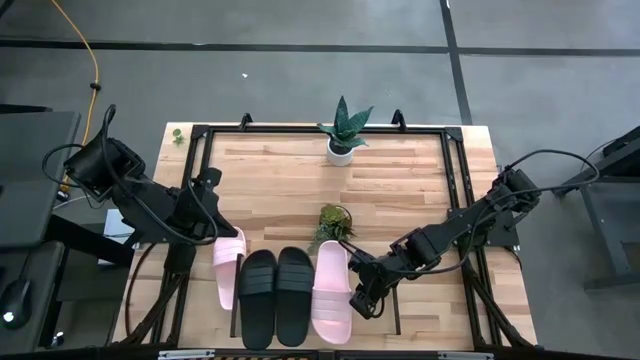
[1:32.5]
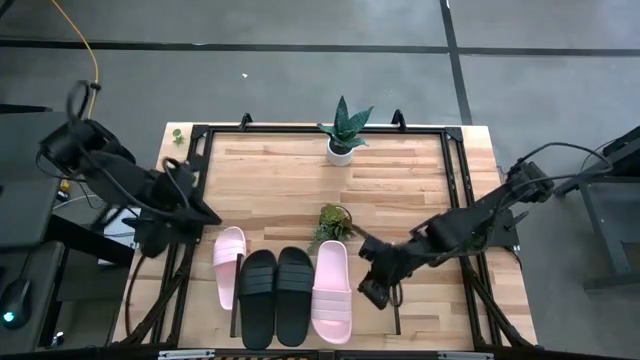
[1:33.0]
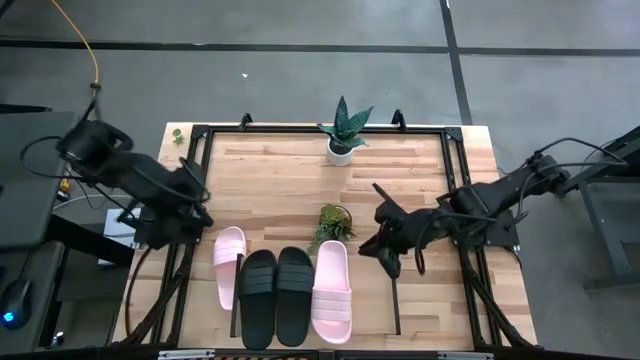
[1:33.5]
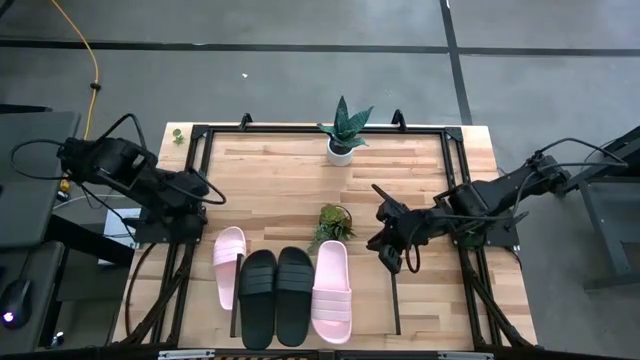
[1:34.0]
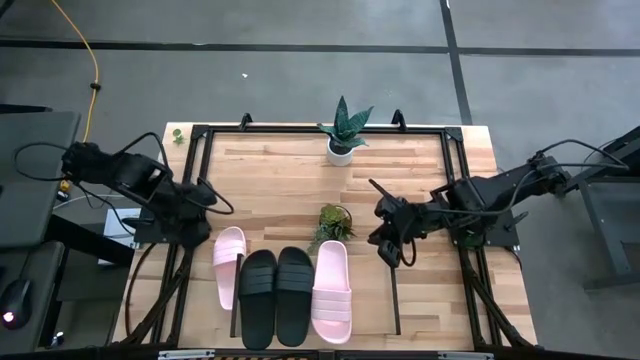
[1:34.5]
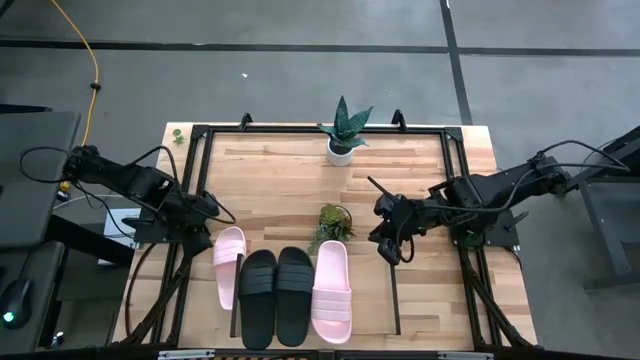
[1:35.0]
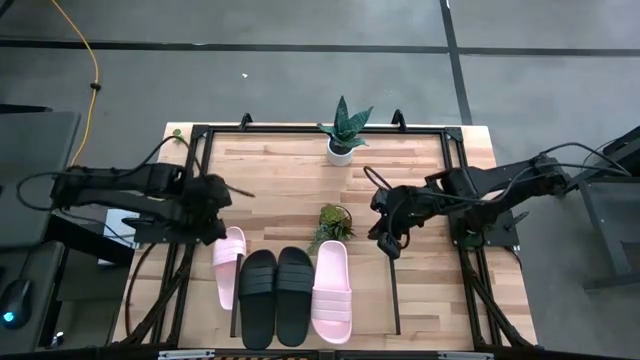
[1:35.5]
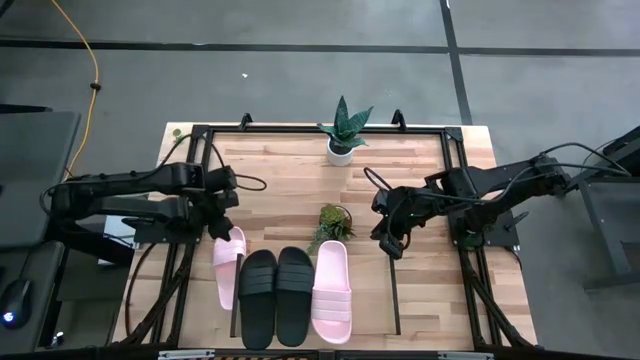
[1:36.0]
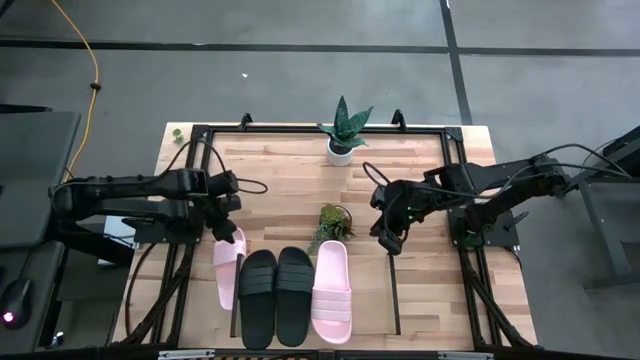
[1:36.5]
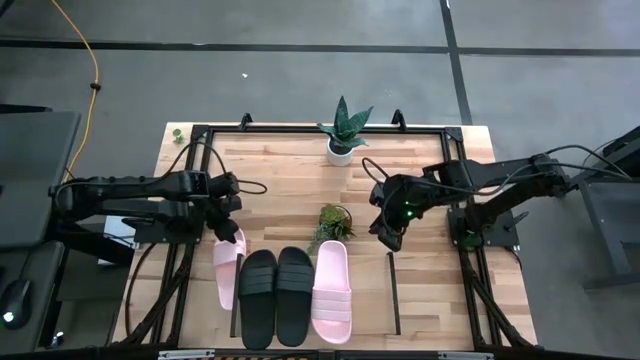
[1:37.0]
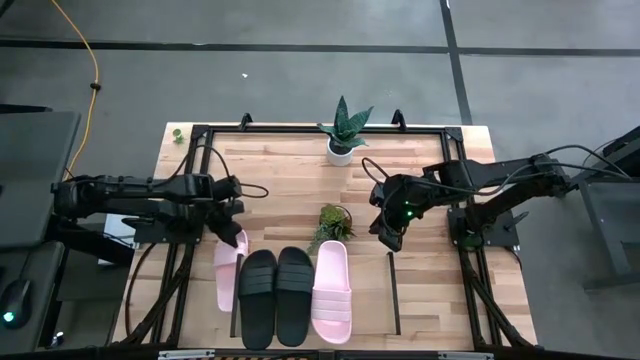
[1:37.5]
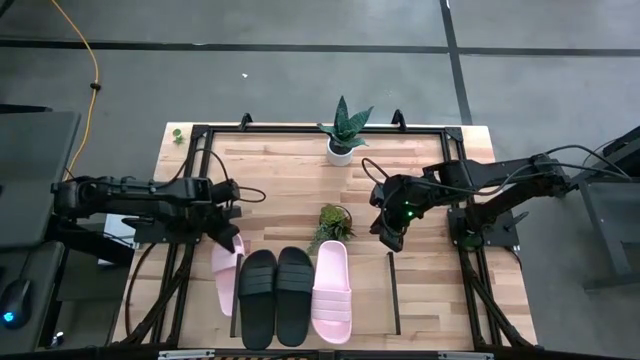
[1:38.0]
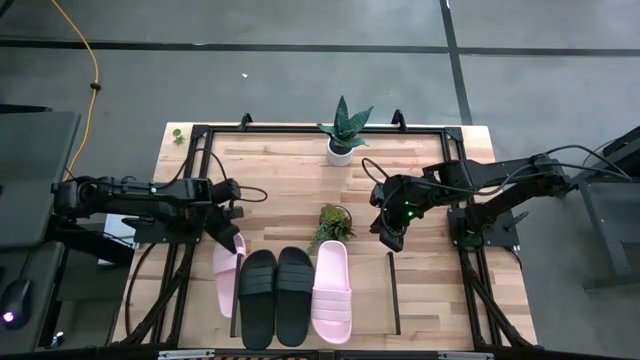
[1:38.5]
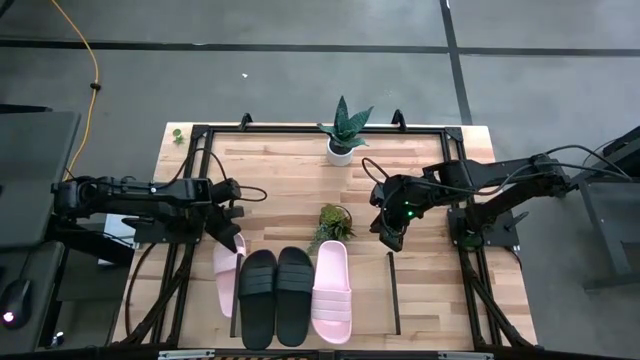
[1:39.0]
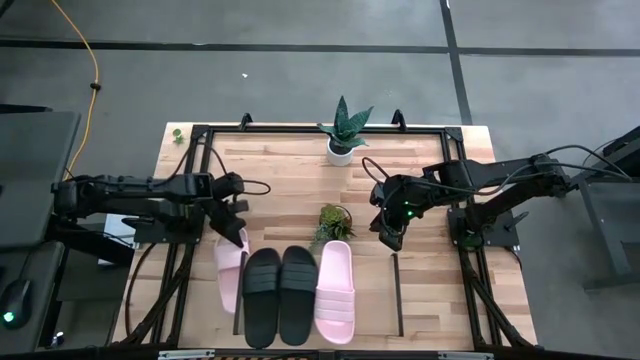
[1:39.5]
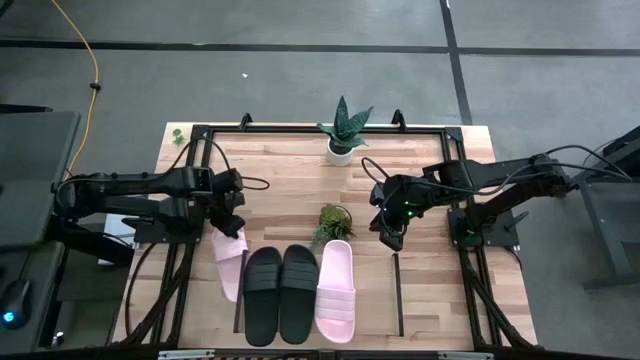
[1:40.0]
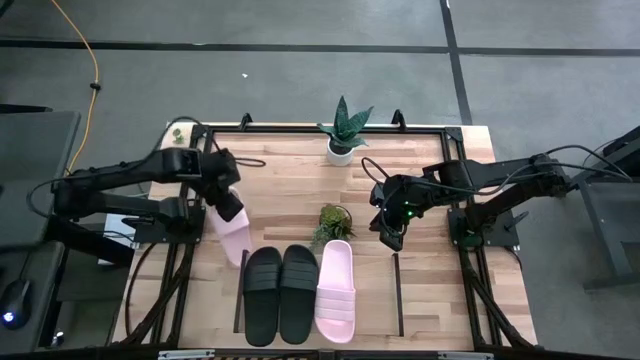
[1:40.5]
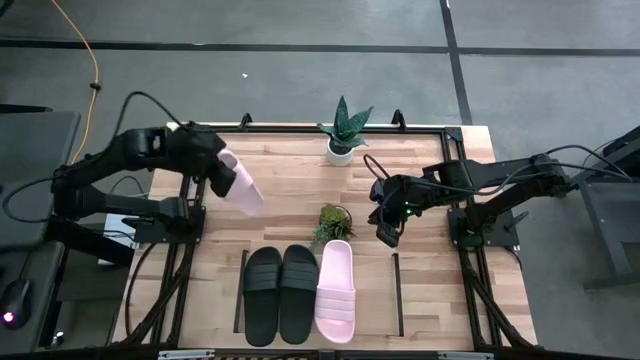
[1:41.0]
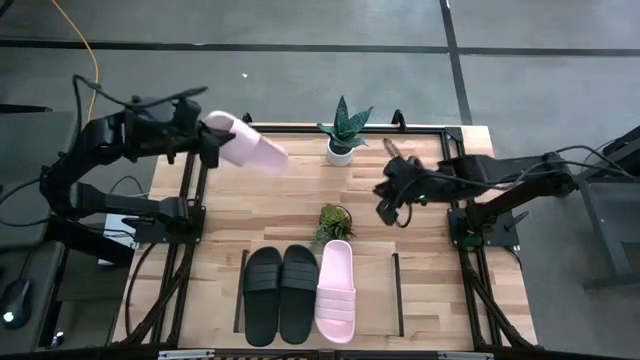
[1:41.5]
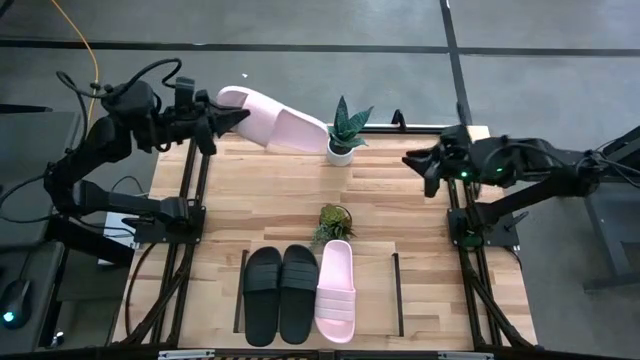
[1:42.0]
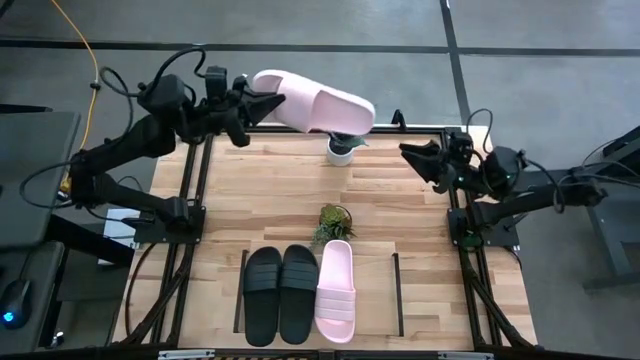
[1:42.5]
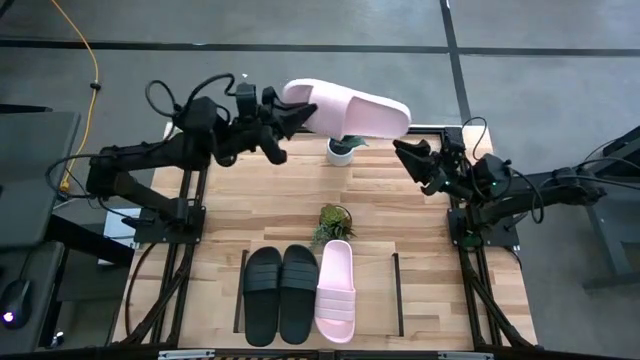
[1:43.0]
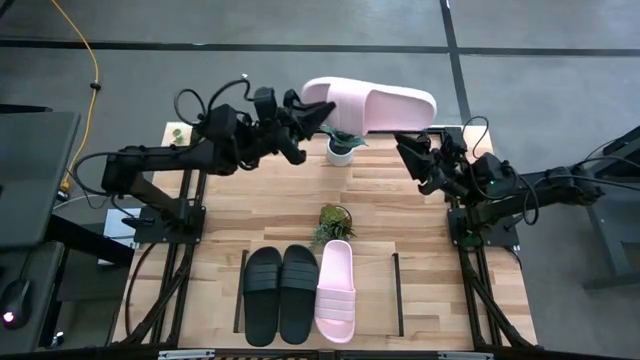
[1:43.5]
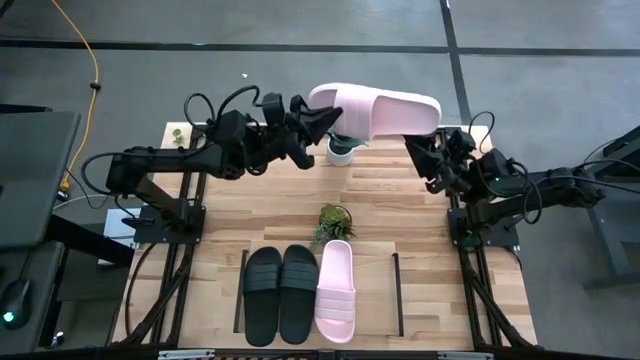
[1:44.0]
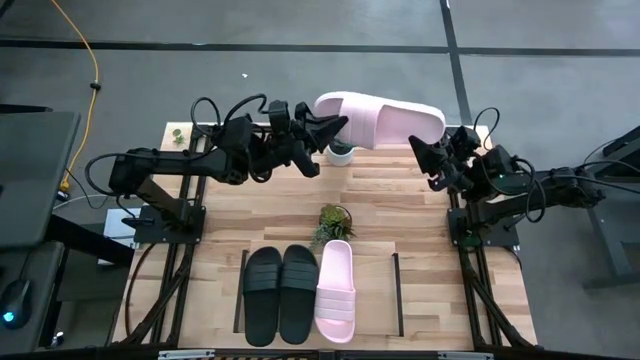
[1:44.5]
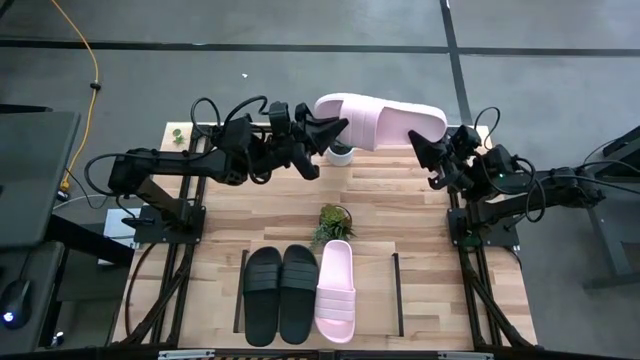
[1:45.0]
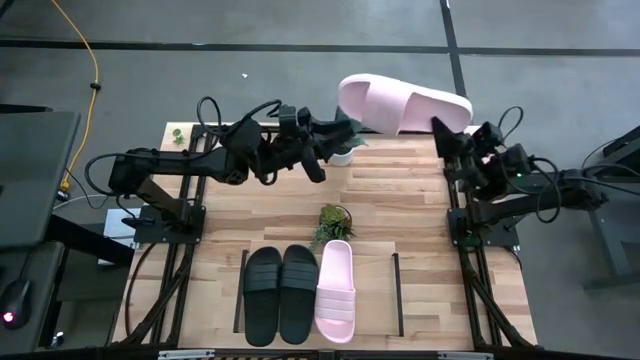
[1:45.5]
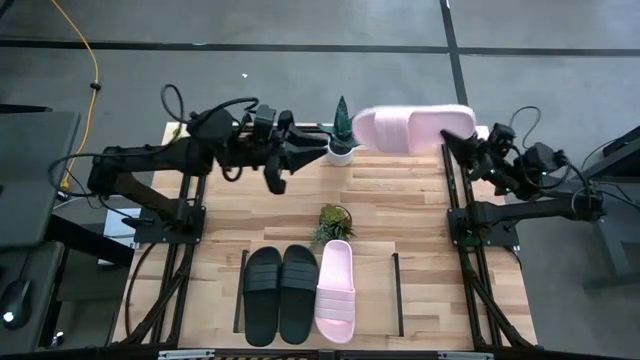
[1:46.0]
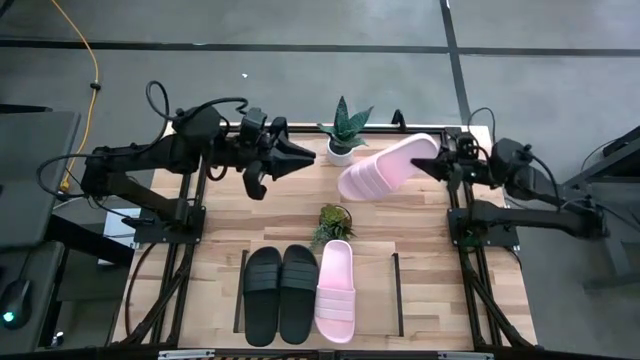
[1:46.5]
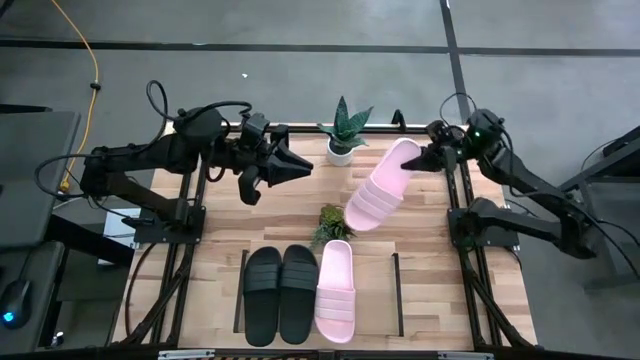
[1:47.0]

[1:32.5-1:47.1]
Task: Pick and place slides into the shelf
Put the pink slide on the shelf

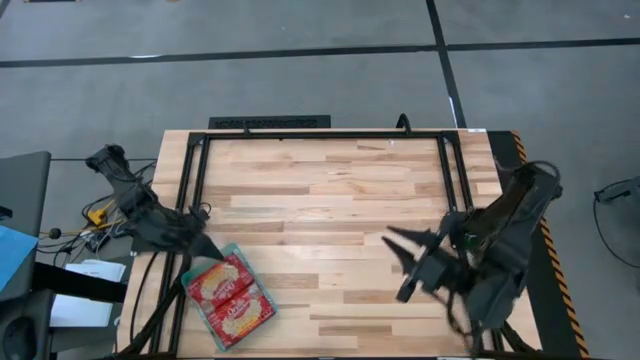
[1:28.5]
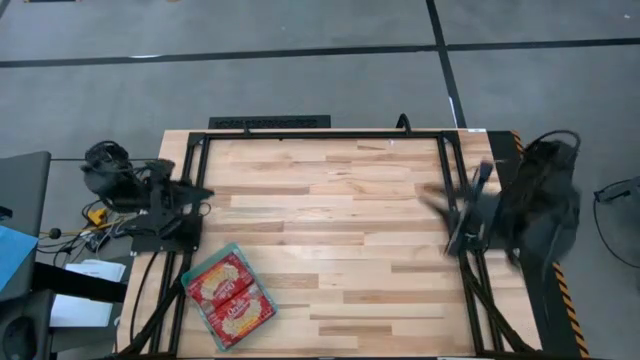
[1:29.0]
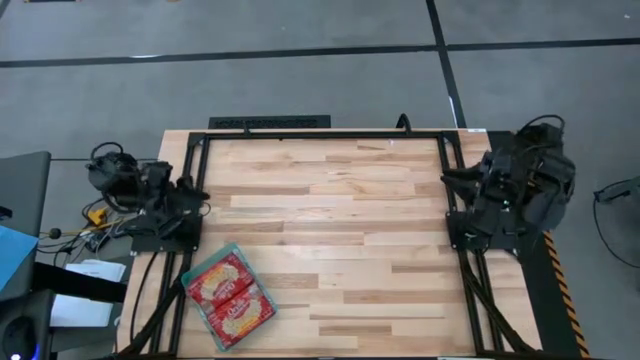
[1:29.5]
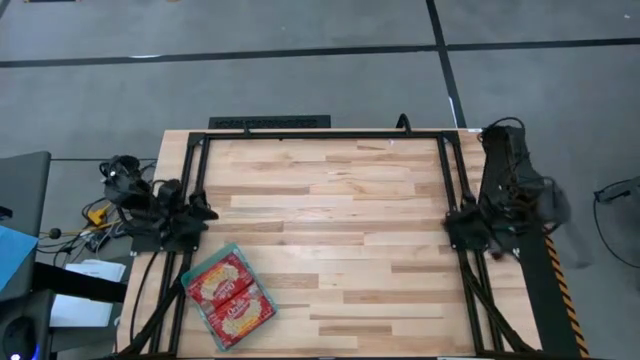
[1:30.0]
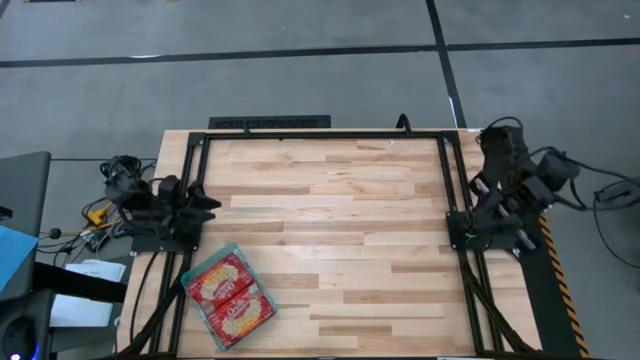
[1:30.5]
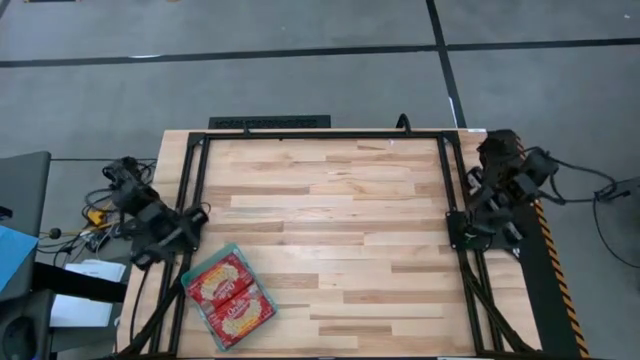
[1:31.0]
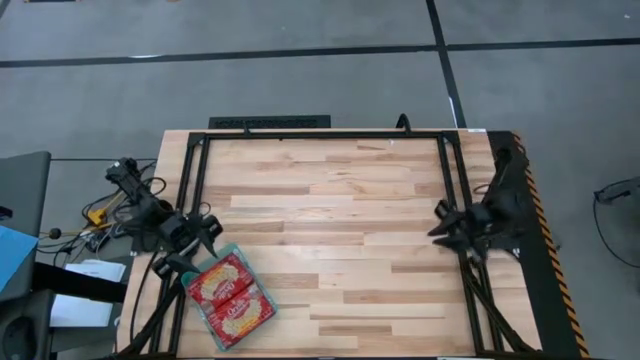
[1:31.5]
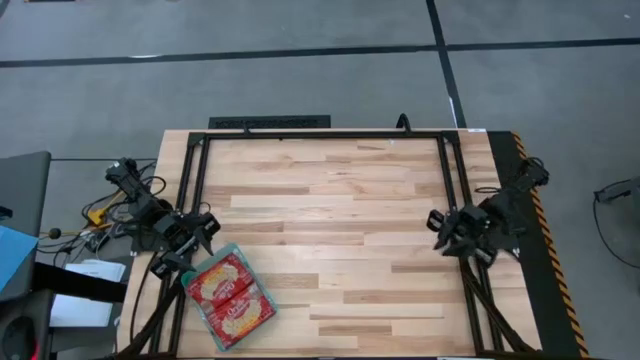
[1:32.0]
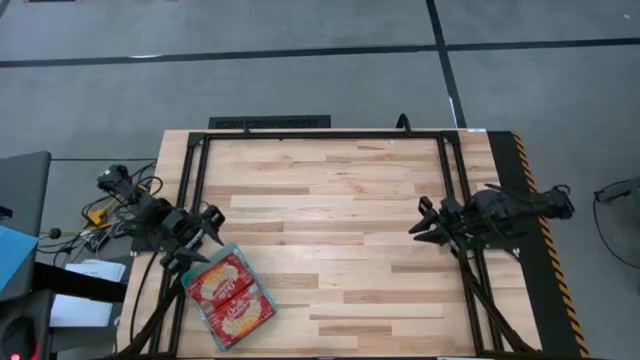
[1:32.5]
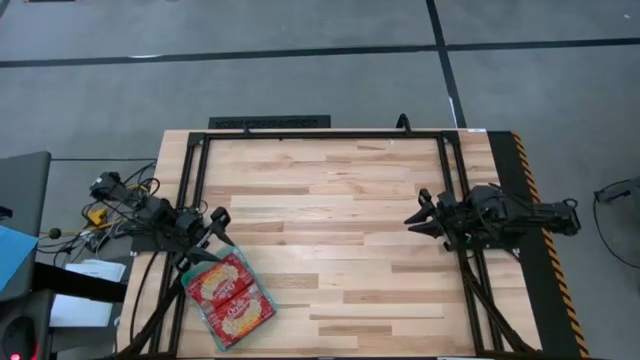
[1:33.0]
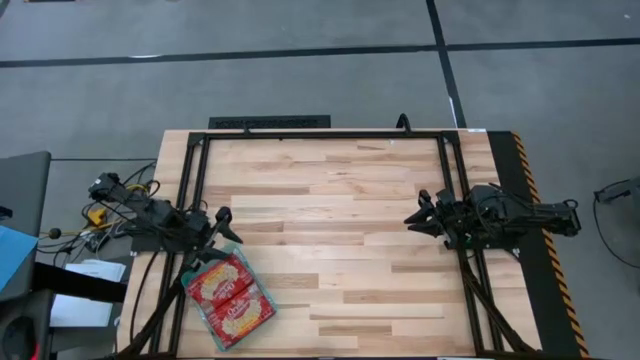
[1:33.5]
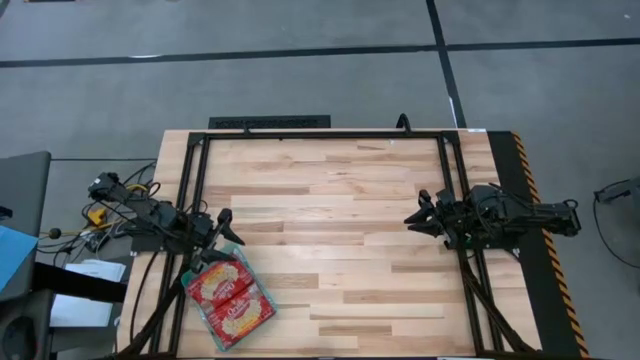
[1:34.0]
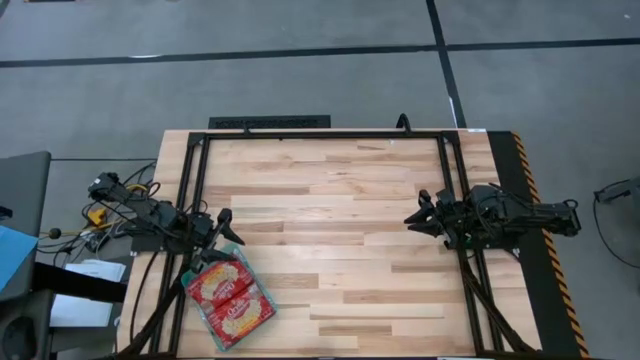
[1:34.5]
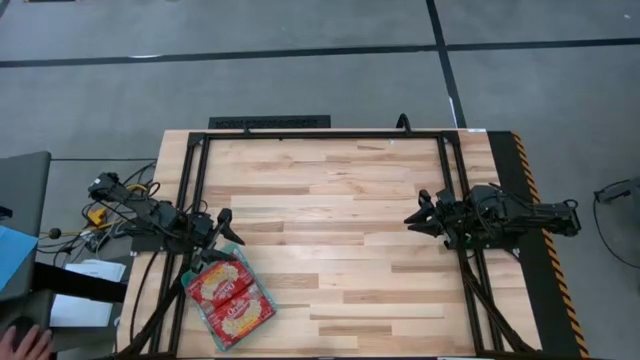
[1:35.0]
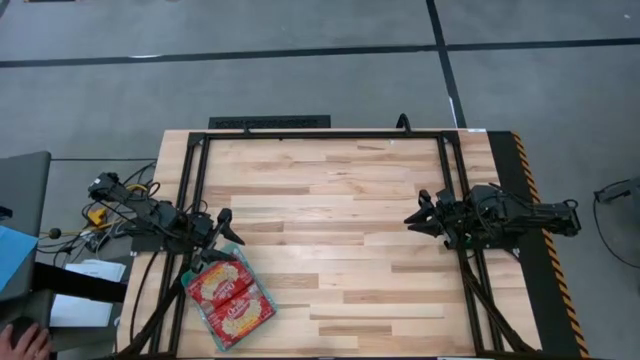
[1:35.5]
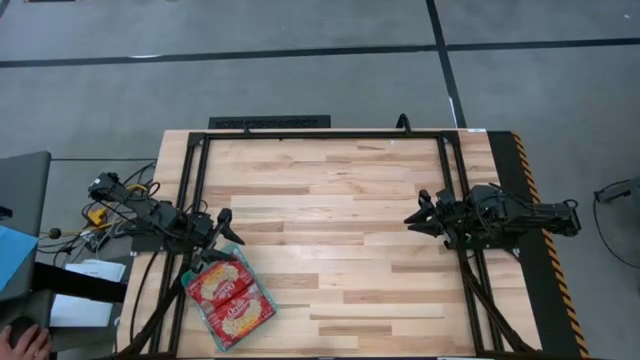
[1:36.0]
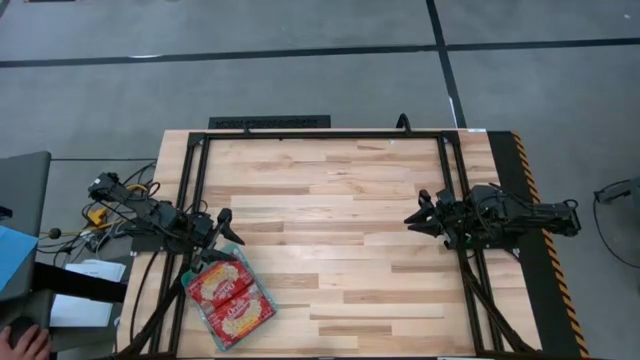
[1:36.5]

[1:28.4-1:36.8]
Task: Sort popcorn bags into baskets
Return to Home Position
